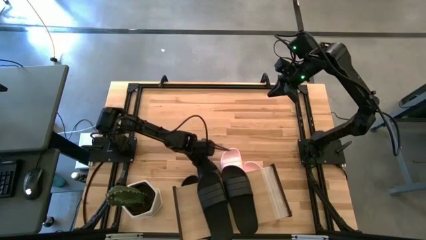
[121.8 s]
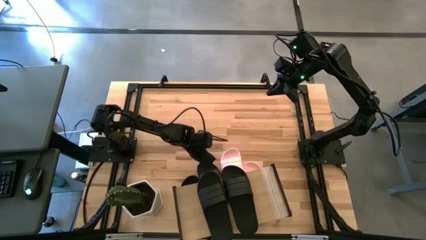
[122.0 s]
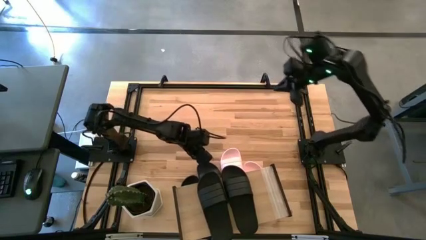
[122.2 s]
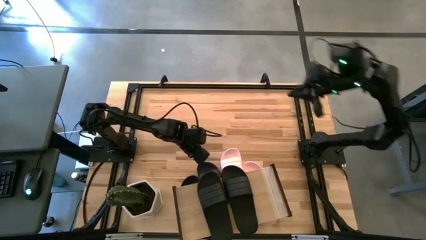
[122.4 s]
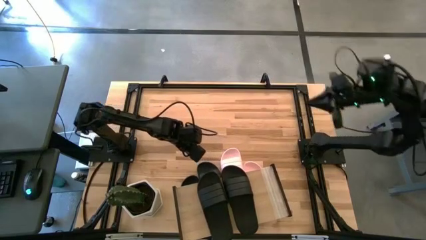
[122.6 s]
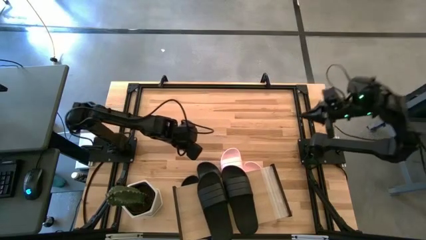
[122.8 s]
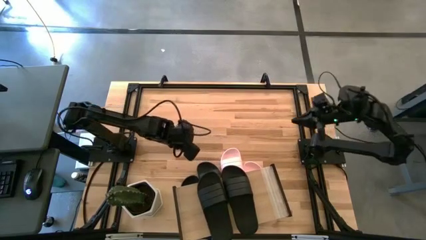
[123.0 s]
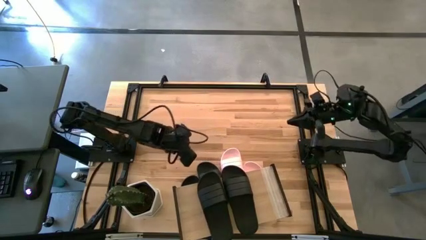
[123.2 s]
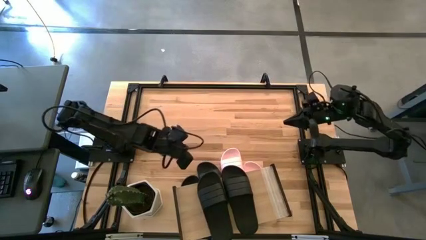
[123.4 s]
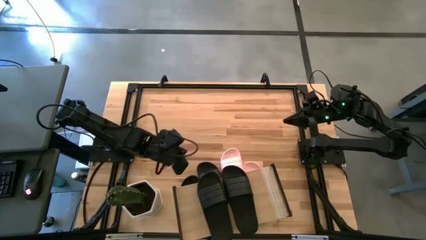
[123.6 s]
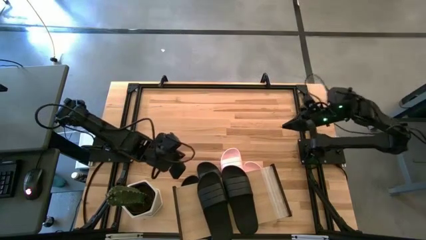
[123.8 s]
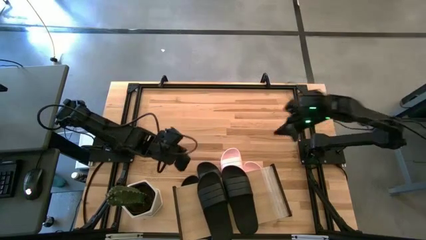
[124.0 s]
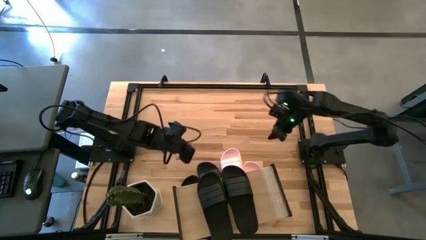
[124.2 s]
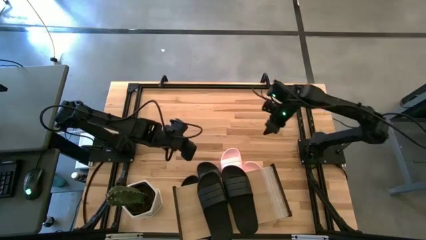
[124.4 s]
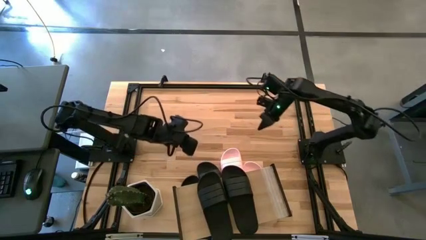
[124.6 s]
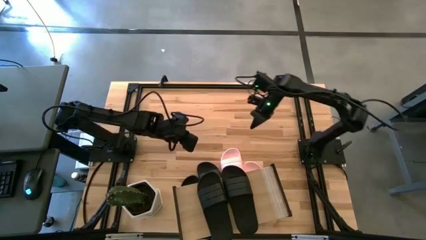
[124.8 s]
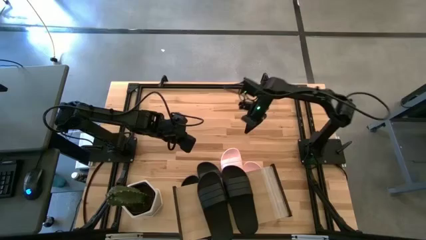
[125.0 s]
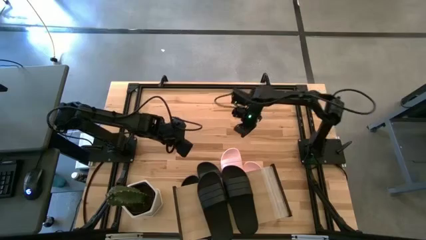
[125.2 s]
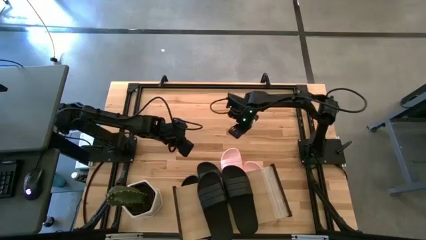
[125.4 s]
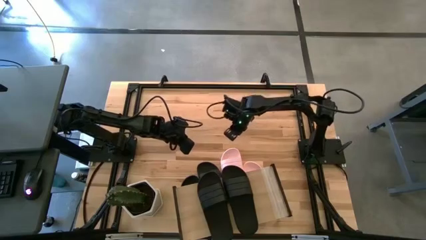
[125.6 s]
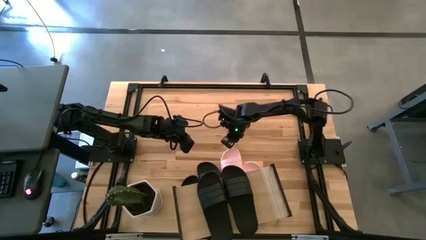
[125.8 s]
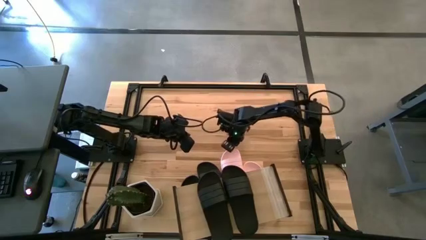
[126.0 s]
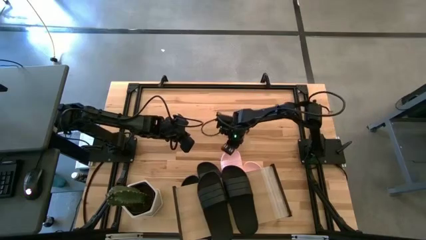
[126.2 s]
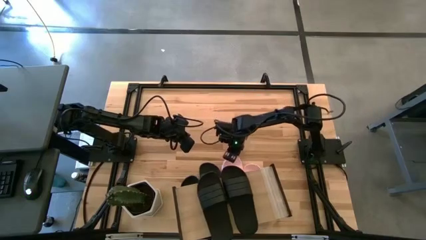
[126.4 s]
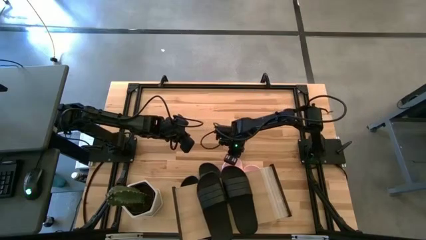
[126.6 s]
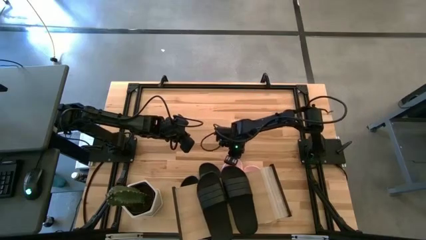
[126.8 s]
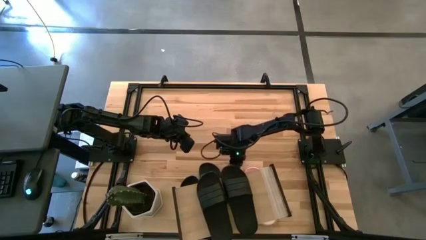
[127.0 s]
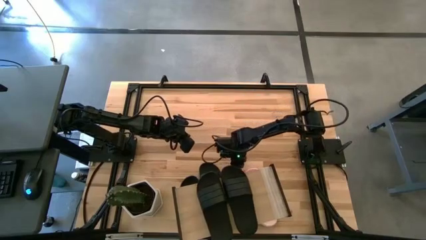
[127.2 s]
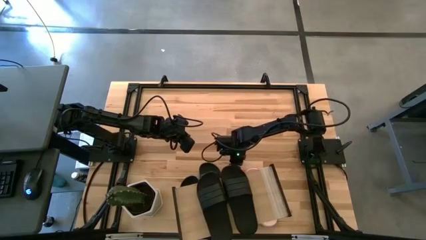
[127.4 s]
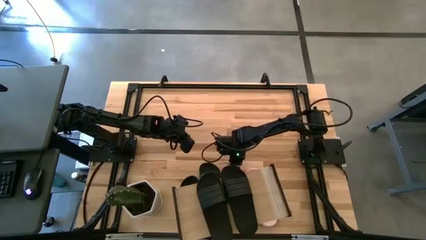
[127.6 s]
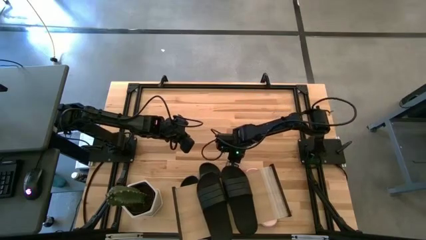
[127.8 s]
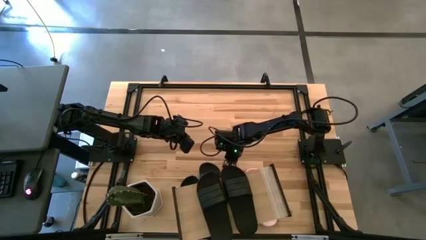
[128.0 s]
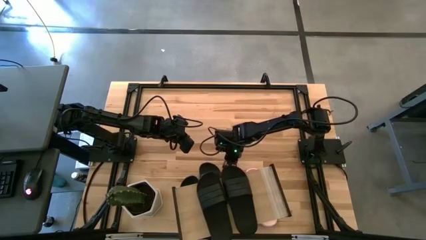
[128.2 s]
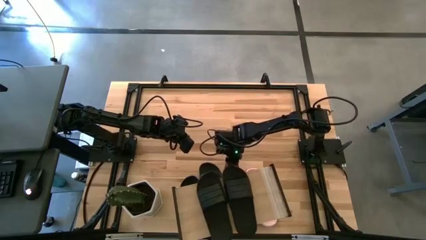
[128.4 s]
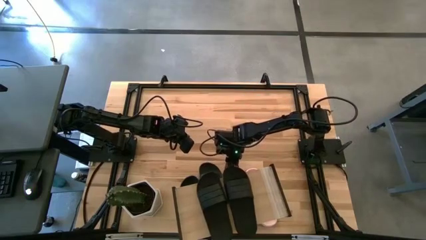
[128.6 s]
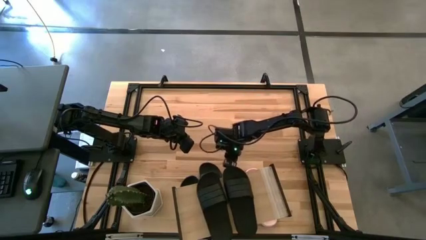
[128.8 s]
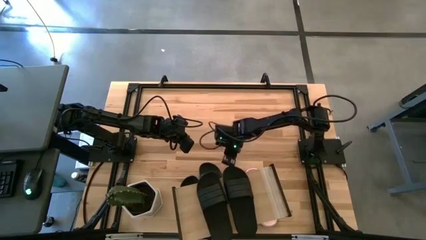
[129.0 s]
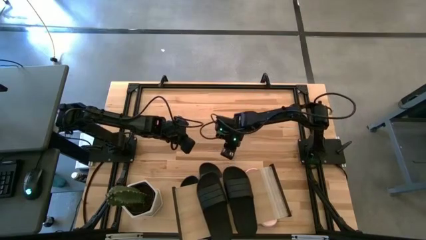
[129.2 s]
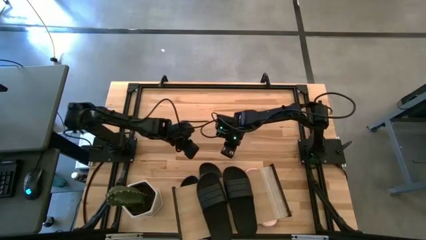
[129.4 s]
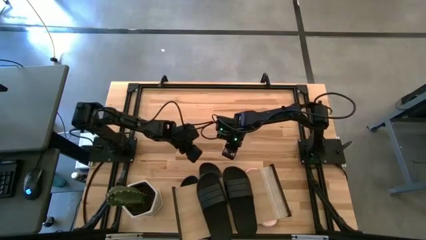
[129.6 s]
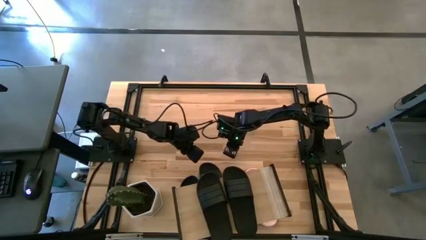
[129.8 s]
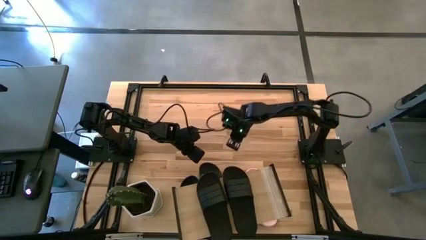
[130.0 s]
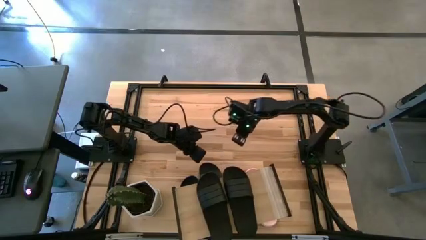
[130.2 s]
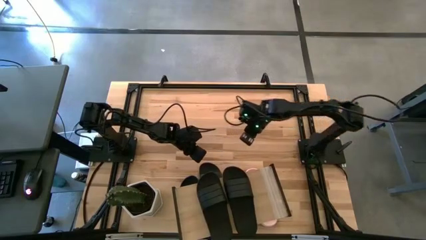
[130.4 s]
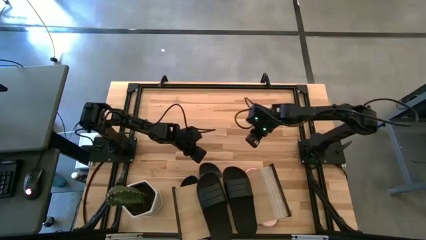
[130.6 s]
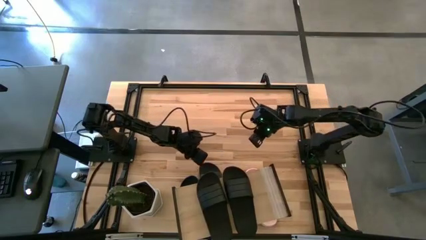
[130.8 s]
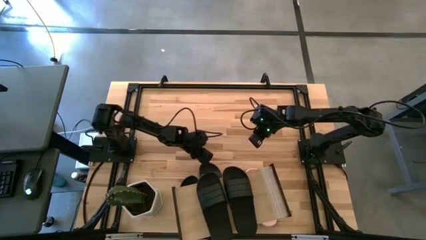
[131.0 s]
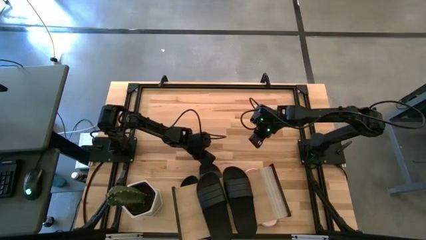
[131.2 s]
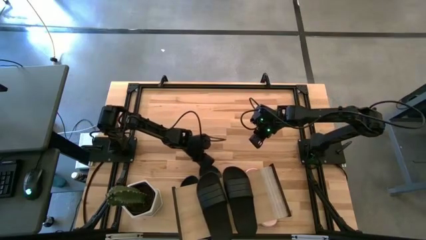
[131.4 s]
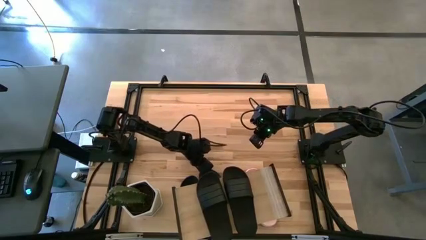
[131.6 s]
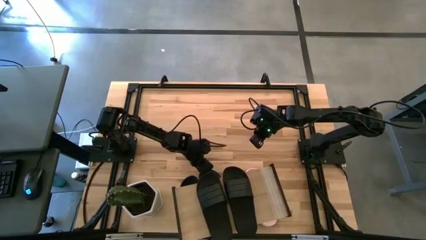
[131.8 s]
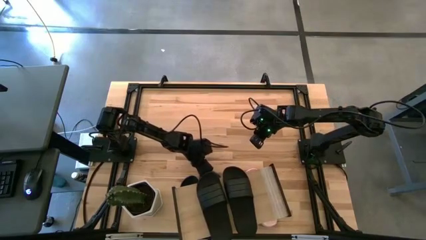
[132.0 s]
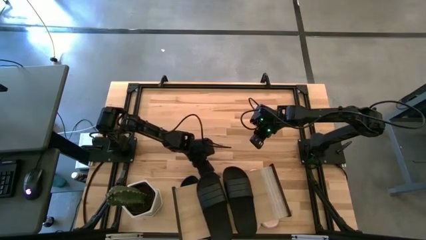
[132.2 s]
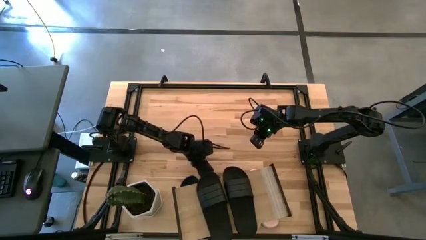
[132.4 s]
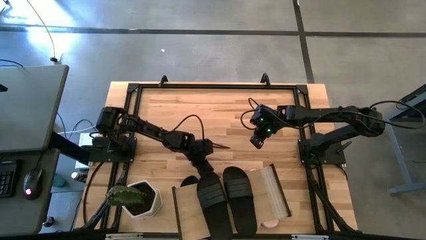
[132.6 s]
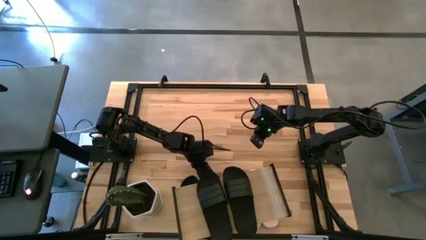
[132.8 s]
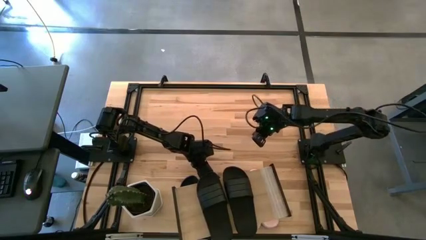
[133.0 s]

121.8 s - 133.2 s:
Task: Pick and place slides into the shelf
Adjust the slippers under the shelf
